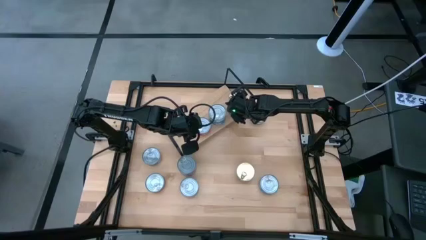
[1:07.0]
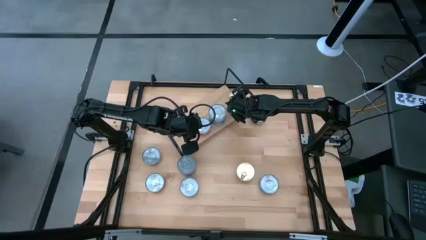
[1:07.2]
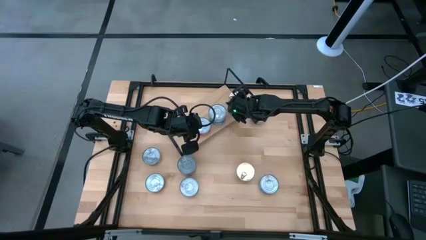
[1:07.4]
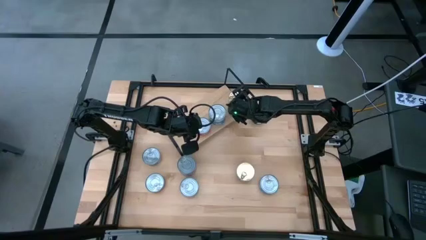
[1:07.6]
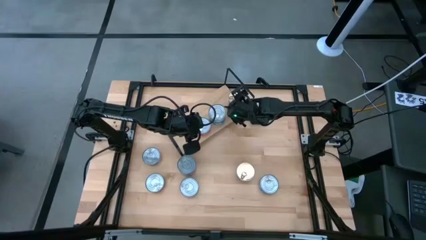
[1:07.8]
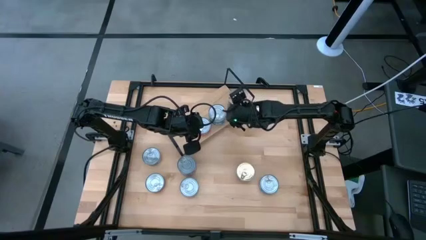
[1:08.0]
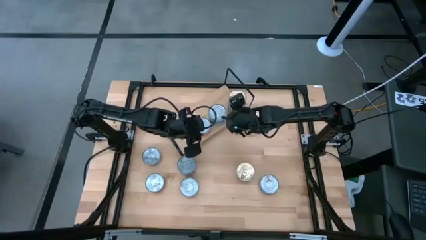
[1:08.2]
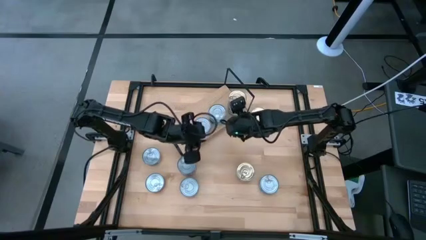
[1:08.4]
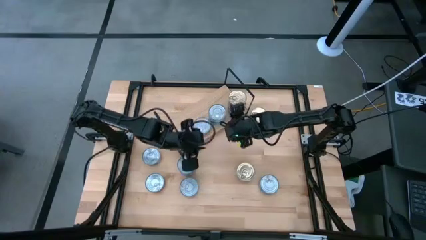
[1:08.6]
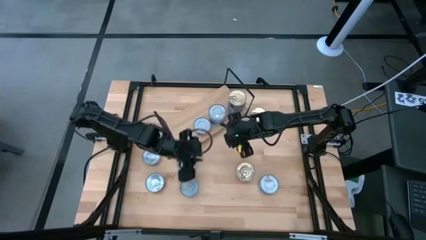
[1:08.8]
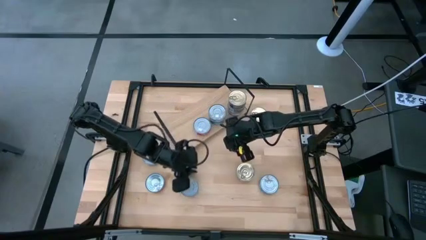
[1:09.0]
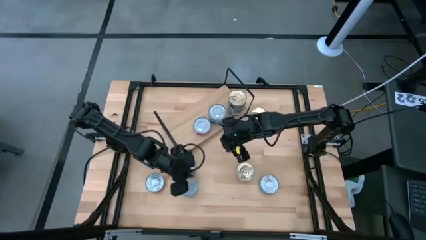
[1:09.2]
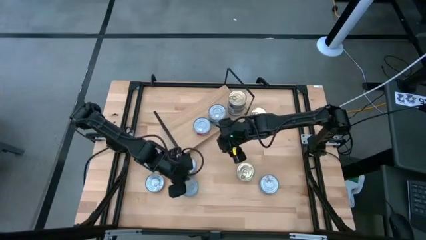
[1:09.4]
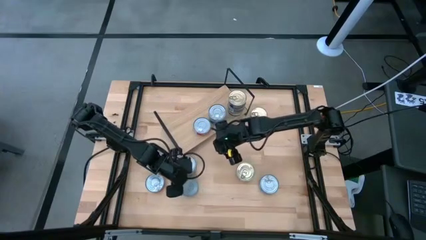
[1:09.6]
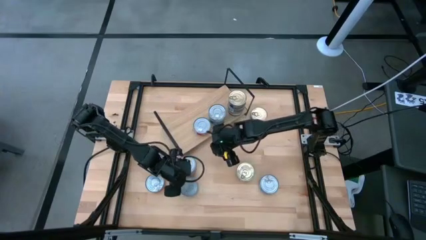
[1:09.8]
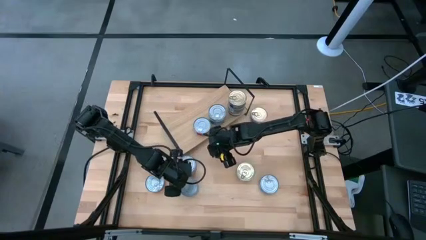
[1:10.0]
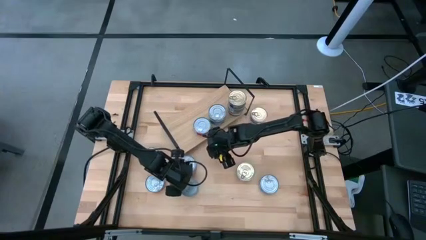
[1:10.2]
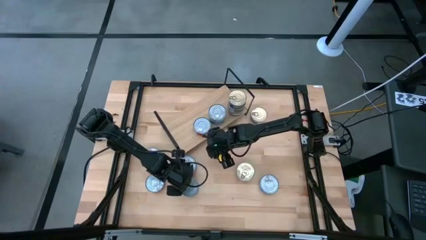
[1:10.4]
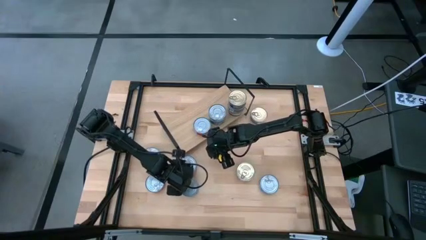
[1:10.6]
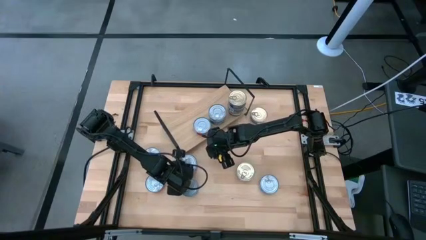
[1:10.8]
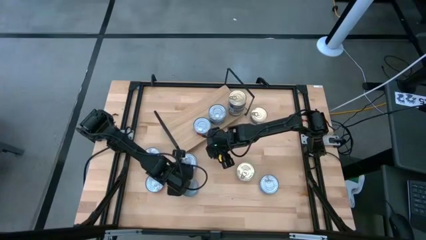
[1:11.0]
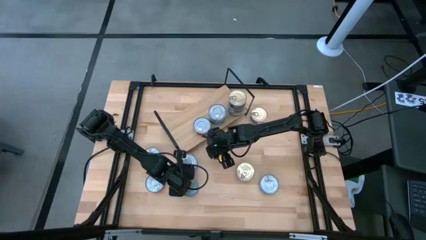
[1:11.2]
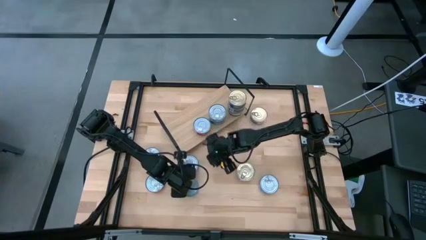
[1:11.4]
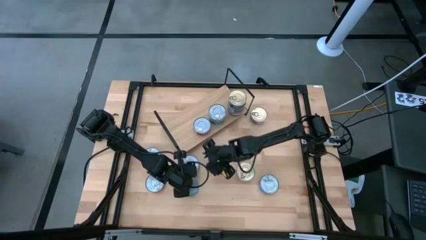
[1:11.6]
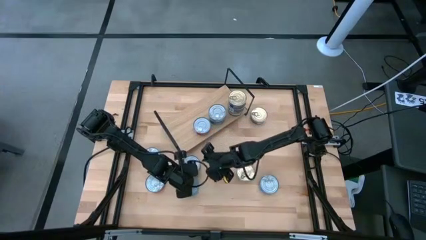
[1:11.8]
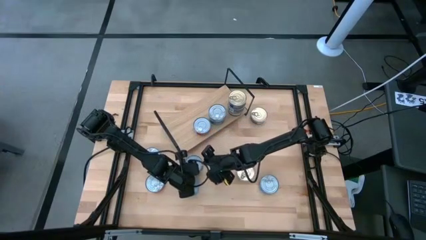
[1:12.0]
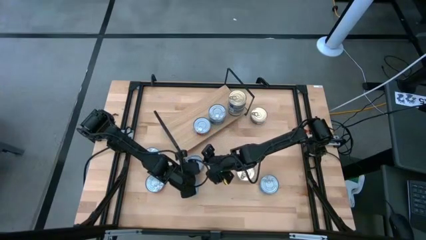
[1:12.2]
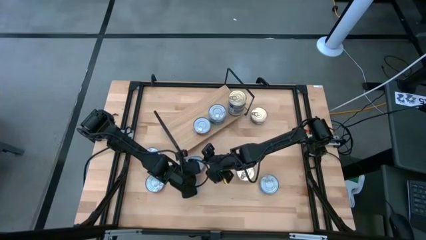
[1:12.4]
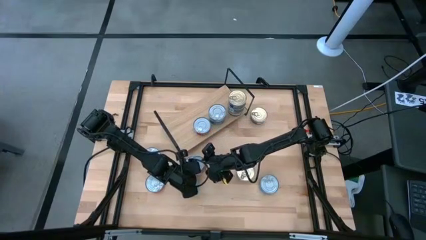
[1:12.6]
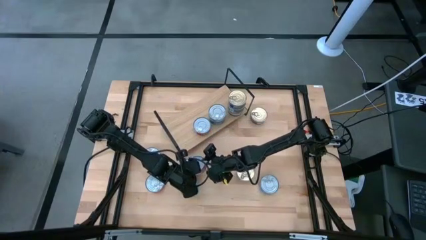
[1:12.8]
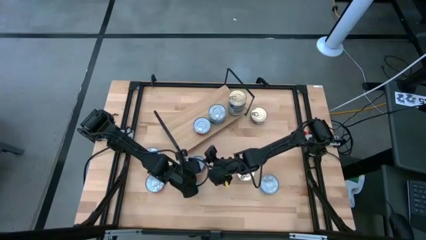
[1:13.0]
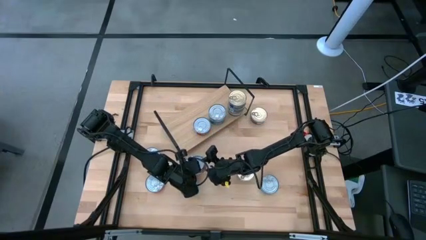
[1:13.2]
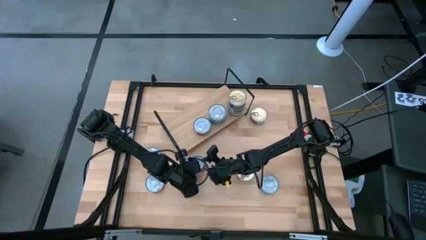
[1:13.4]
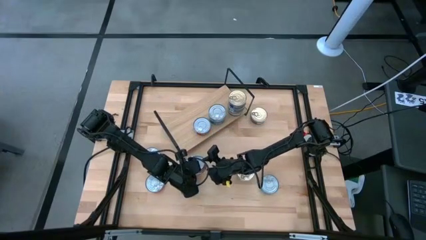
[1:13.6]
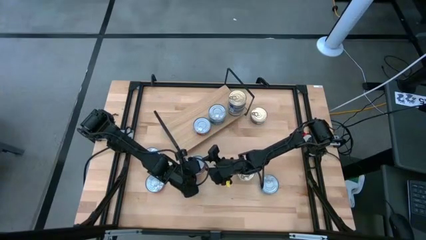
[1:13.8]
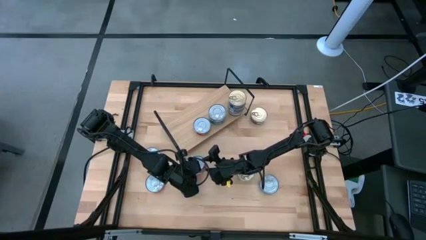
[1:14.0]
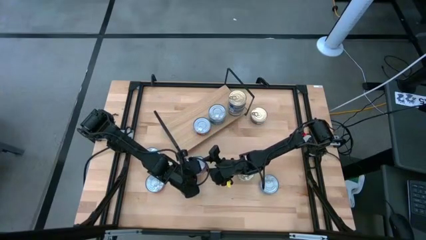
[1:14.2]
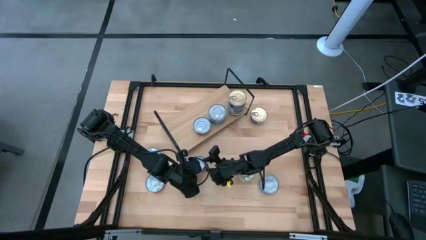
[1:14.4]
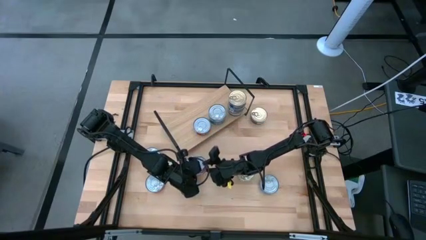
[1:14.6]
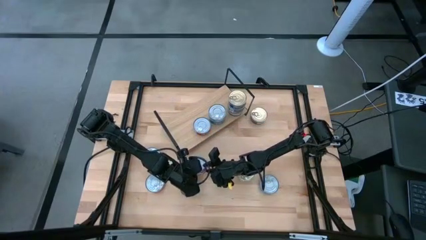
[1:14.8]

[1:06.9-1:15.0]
Task: Stack canned seafood by type on shelf
Stack the red tuna can on top of the red tuna can on the shelf

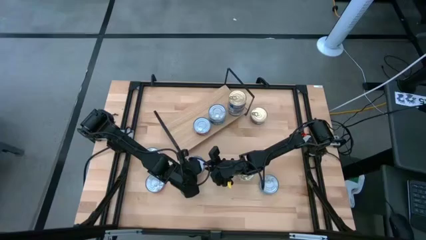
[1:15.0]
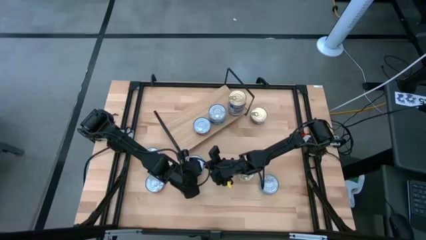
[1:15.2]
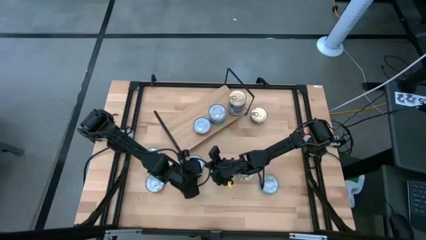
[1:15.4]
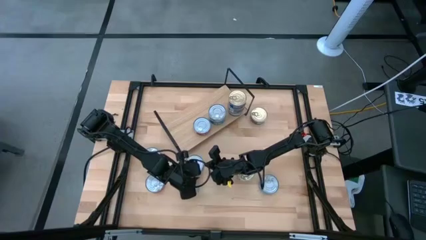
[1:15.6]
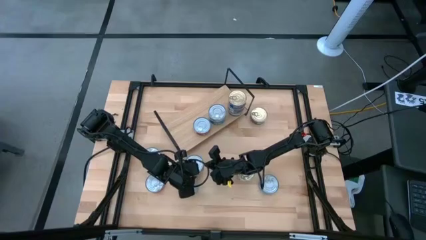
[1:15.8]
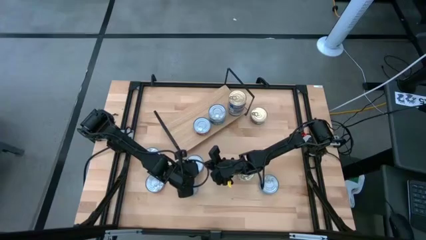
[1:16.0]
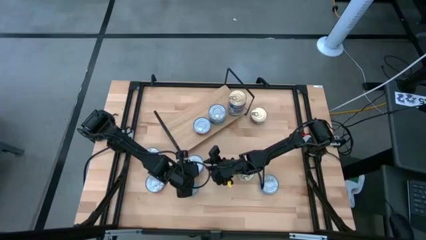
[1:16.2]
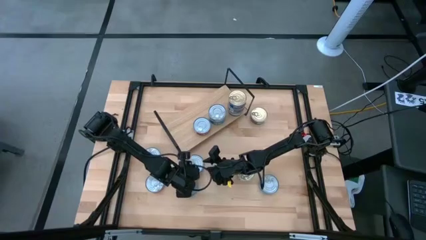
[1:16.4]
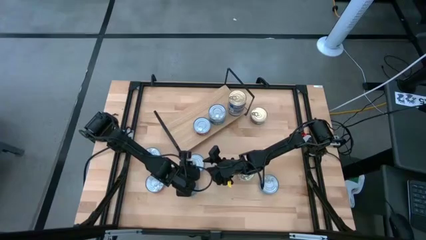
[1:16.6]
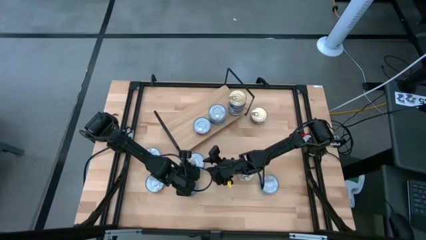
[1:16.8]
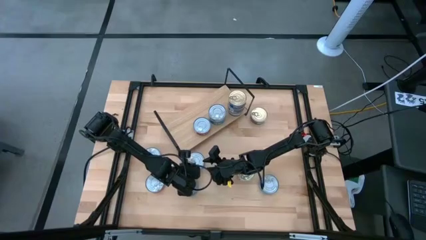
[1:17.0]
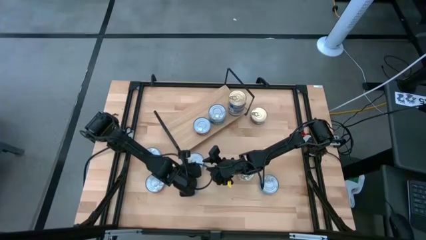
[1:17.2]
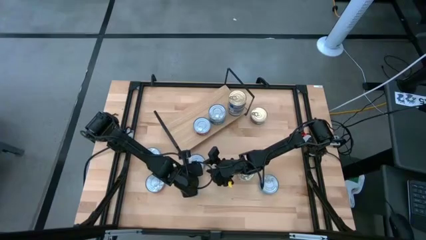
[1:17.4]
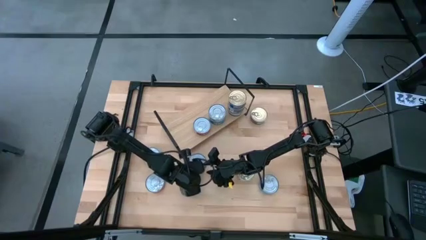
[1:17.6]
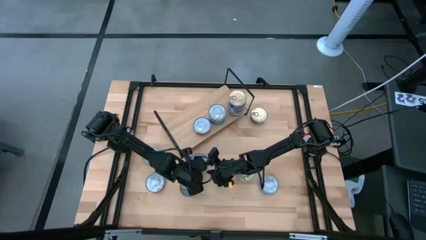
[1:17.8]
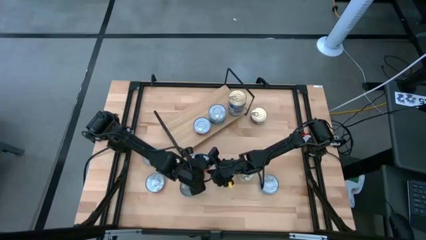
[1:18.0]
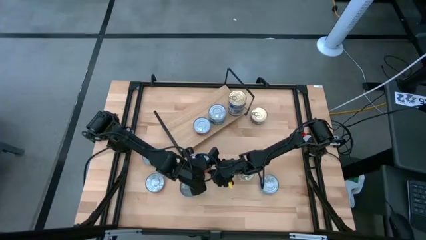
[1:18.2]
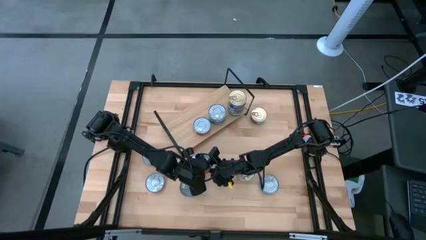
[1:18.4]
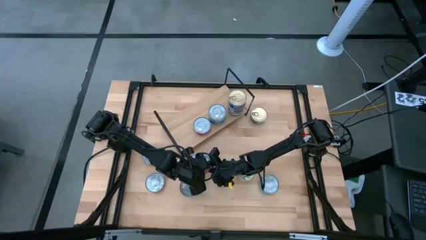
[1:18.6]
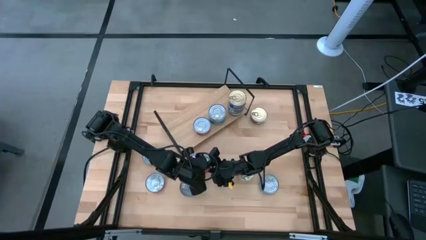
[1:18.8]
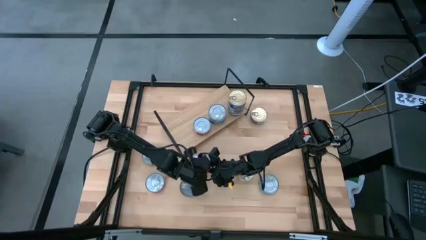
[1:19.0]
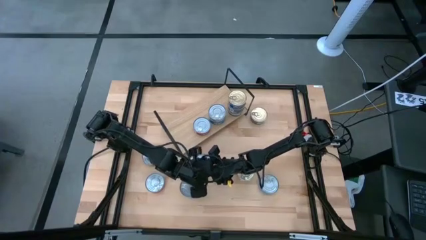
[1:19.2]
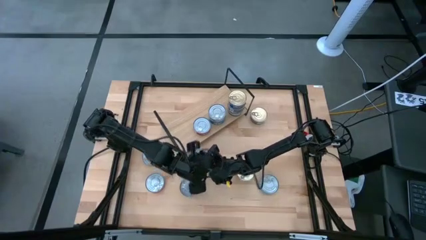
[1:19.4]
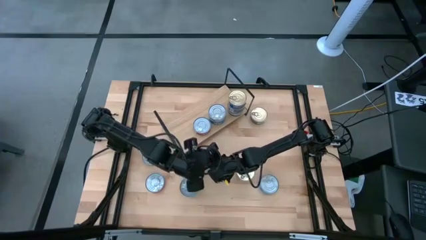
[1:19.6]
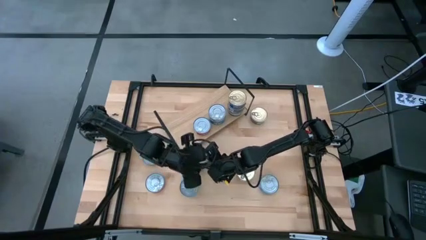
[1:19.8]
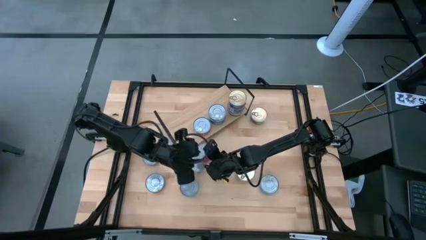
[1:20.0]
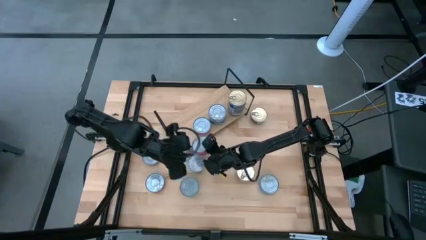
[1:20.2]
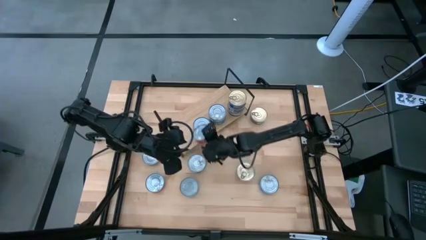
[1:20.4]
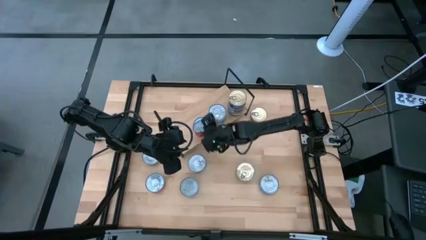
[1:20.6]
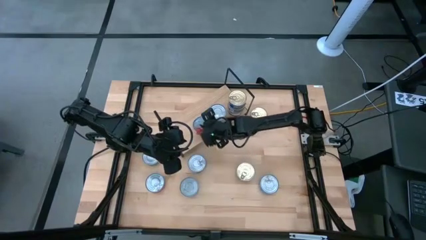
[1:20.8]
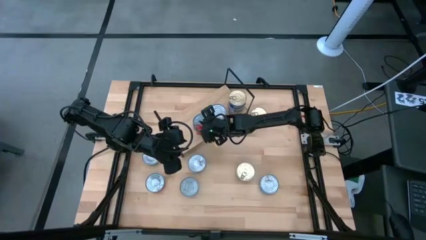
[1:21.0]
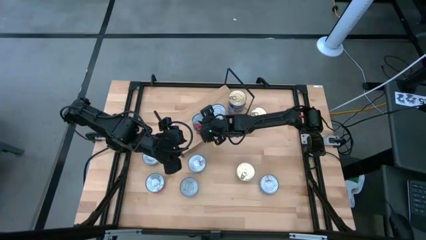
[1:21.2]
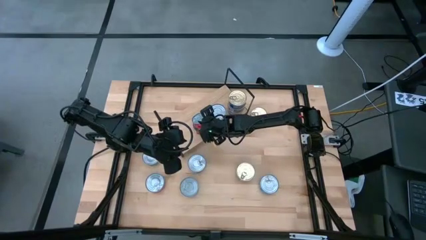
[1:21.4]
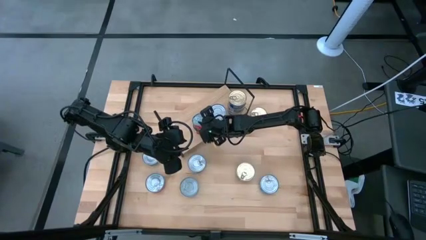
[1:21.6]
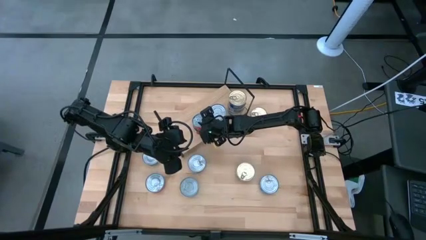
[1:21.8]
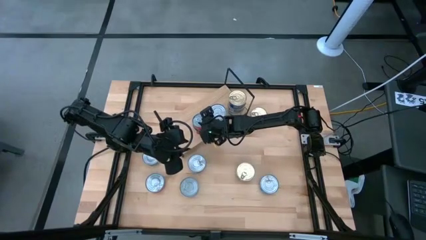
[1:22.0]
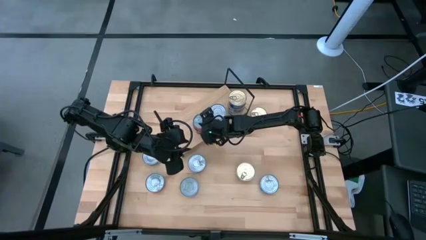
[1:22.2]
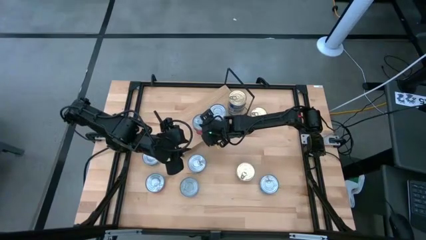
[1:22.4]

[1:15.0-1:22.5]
Stack the red tuna can on top of the red tuna can on the shelf

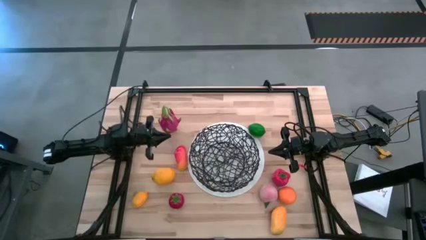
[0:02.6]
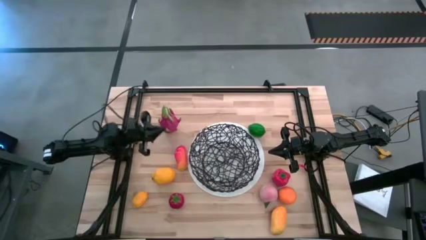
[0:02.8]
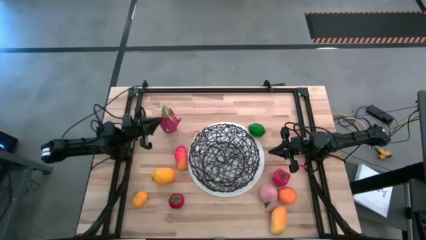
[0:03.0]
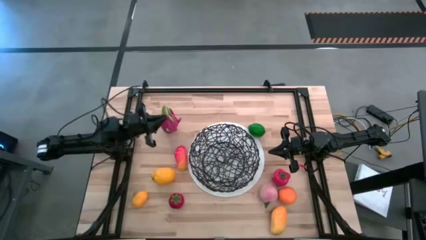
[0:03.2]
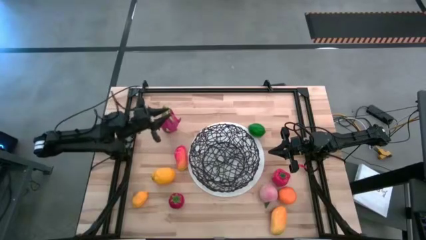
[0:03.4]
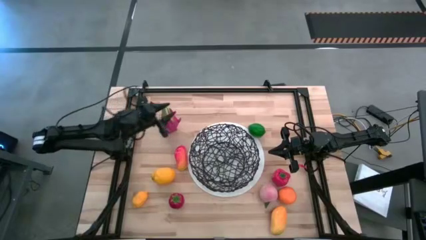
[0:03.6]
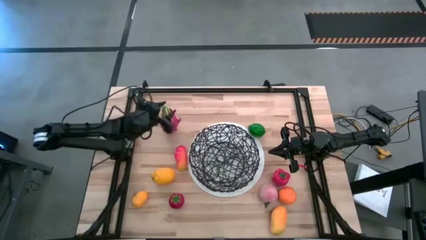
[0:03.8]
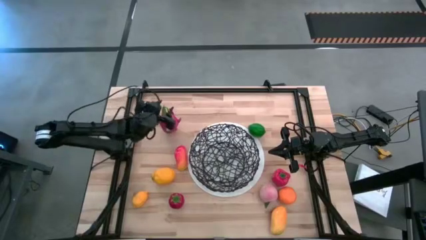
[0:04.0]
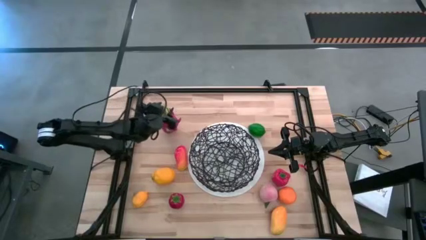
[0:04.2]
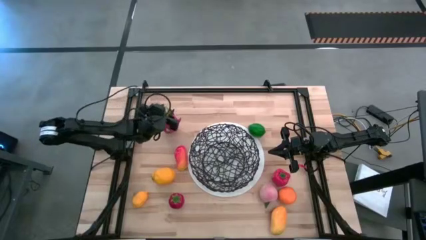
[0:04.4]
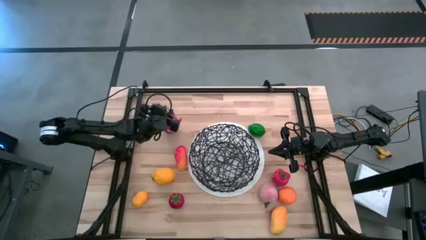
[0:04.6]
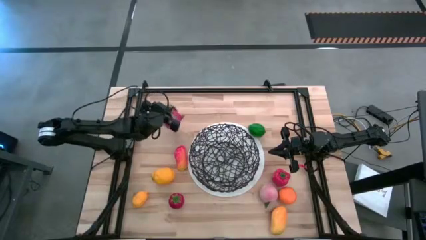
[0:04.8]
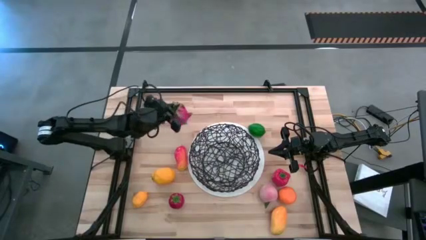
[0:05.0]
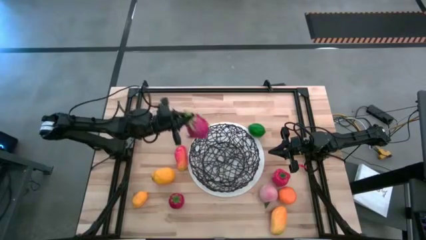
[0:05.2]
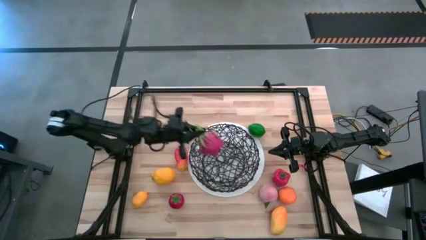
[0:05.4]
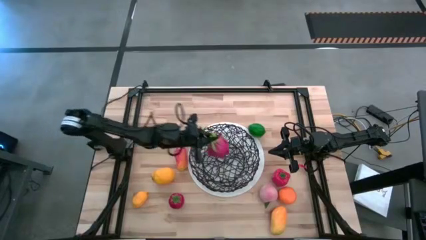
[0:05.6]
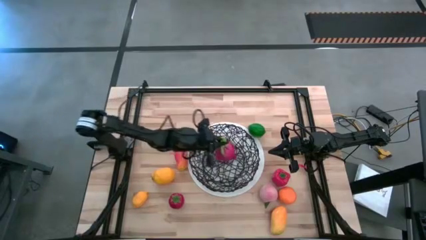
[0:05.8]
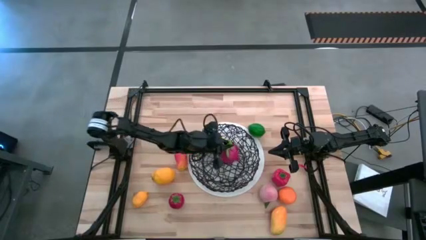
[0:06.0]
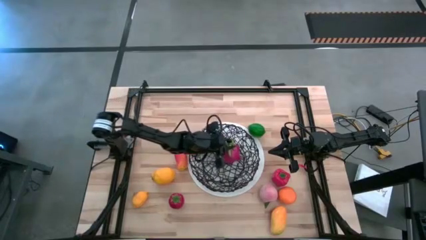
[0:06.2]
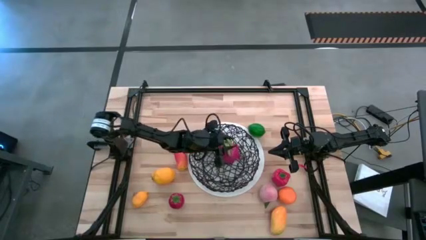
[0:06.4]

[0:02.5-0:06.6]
Task: Build produce basket
Put the dragonfruit into the basket
